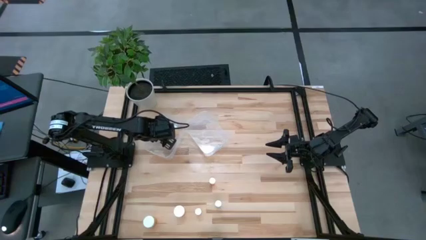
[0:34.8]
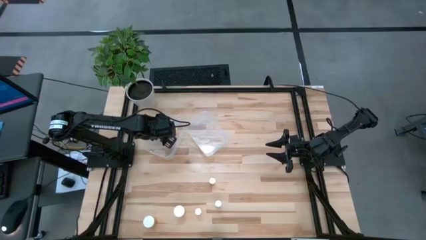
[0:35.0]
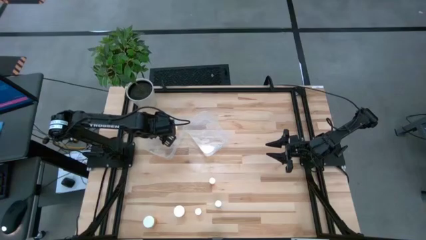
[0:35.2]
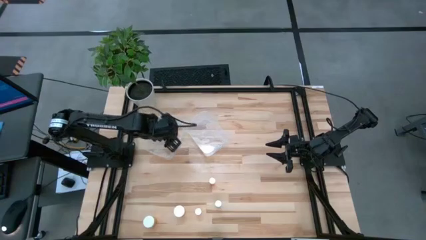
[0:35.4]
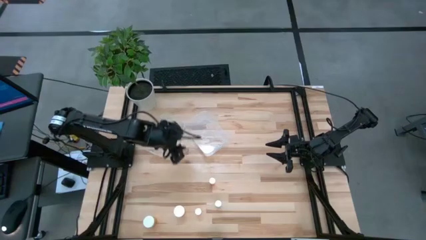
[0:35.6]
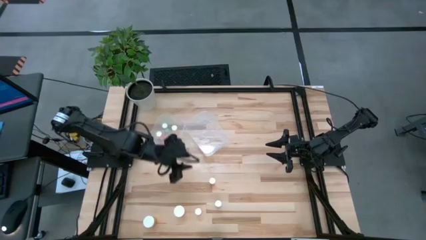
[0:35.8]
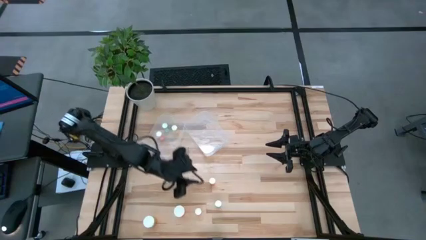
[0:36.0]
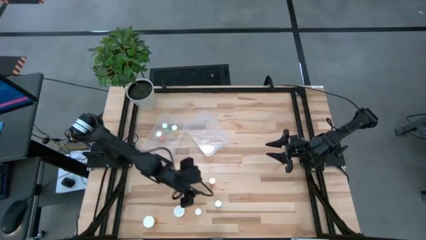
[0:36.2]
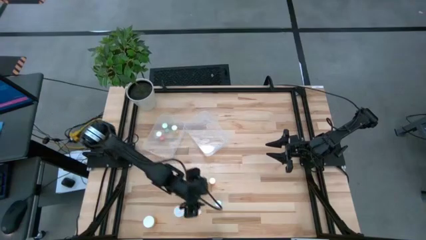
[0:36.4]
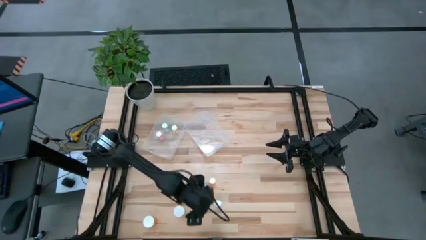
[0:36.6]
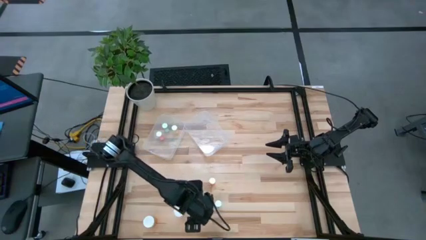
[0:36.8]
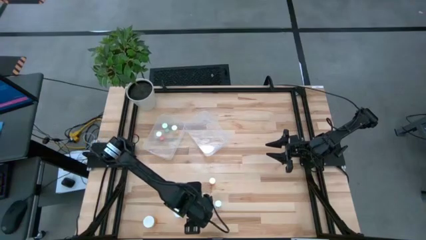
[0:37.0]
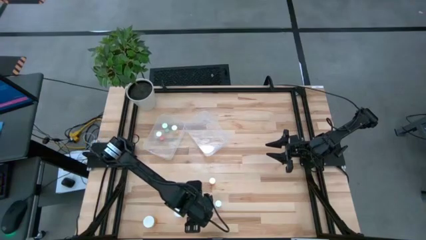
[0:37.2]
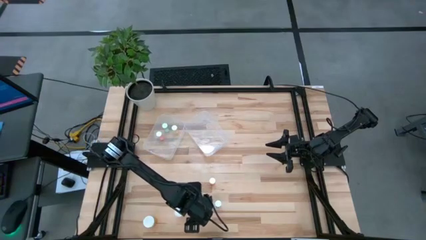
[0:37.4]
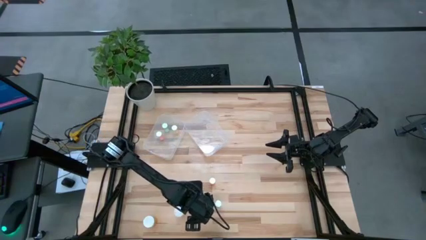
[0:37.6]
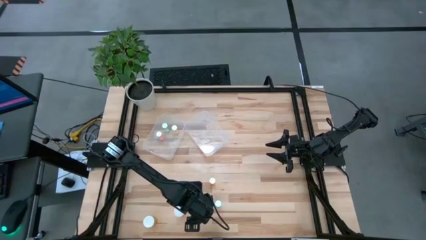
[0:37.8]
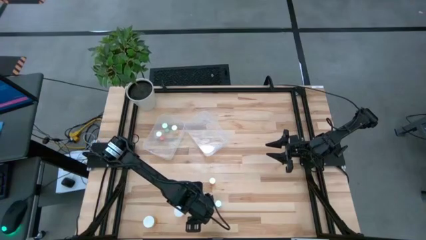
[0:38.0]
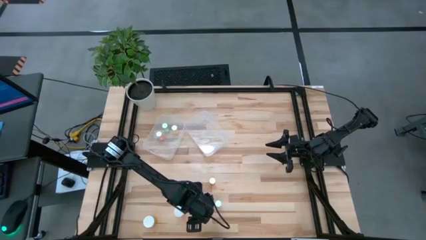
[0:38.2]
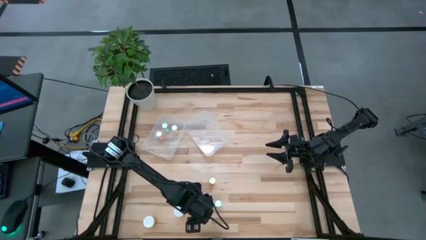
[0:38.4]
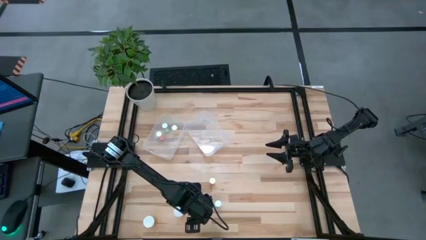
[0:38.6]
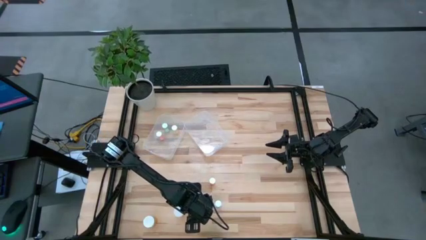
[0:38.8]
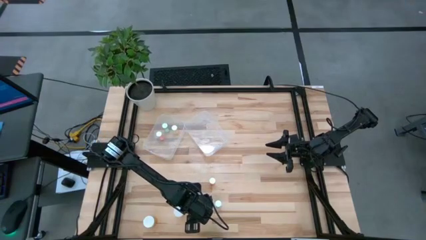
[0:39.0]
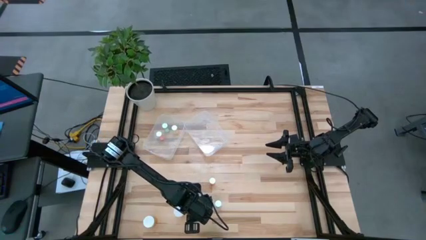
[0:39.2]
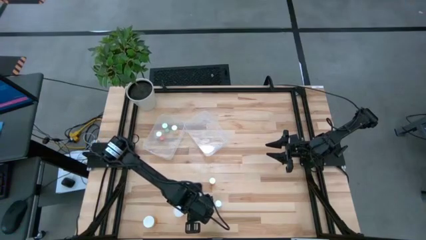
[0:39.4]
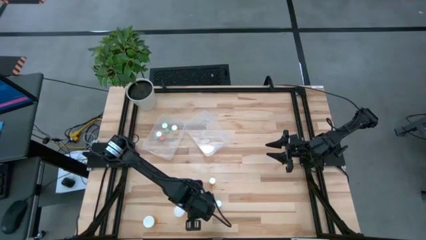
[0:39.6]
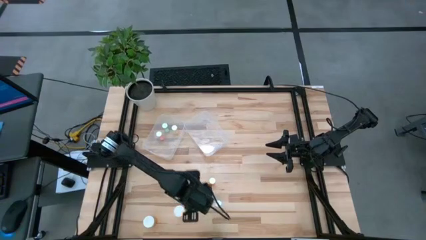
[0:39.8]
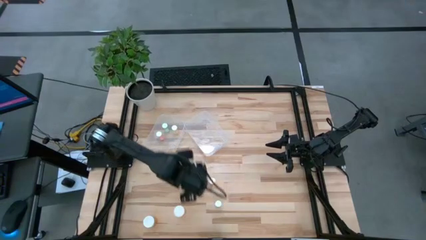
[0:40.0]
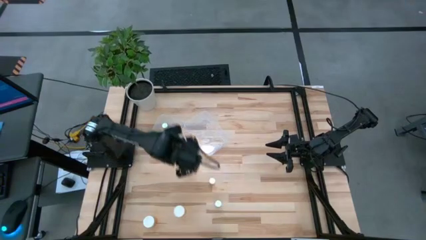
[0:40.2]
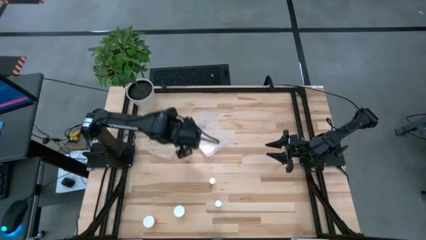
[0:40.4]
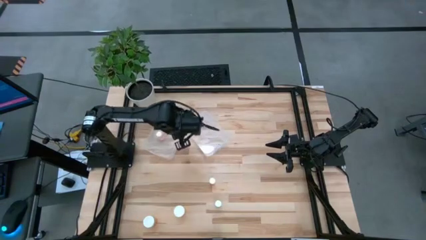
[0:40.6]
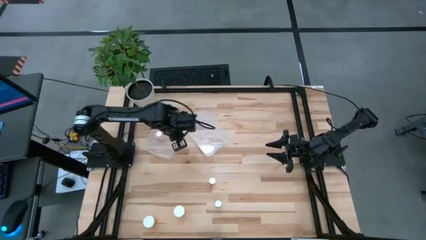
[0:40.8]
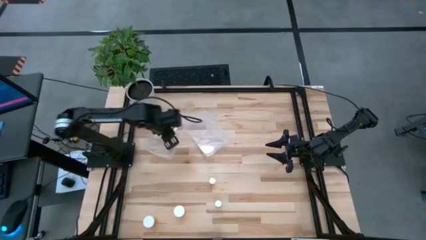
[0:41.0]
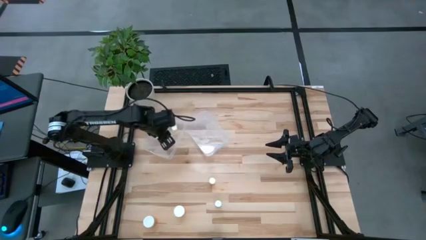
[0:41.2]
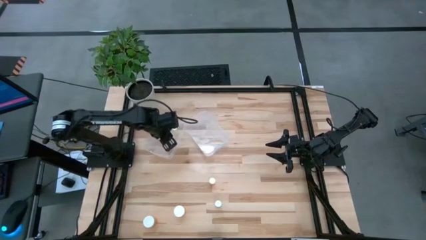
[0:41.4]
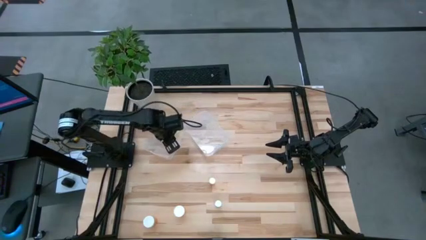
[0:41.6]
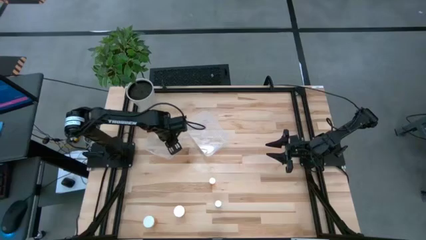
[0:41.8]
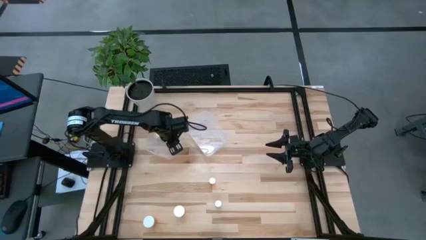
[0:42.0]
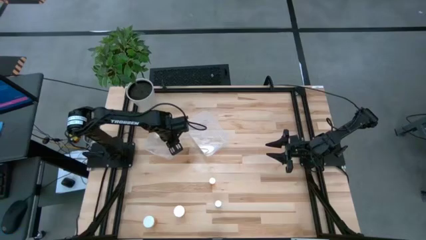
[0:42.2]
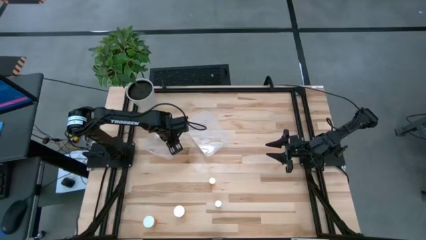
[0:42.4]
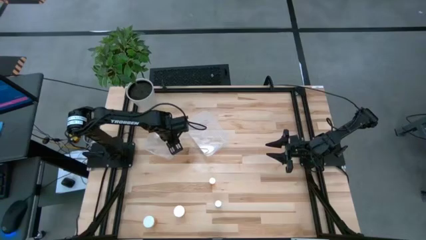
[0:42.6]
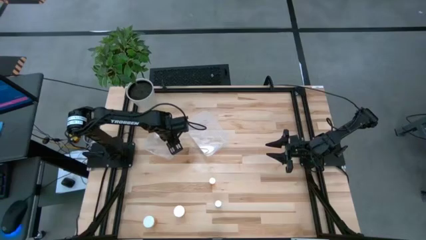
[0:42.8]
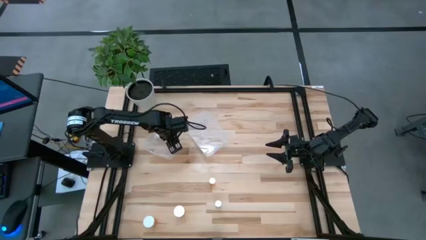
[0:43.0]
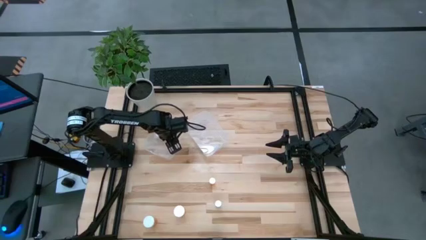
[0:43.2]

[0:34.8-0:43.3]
Task: Pick and place medicine bottles into bin by pill shape (circle, oval)
Put the orange tablet bottle into the left transparent bin

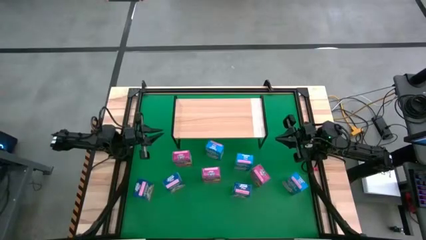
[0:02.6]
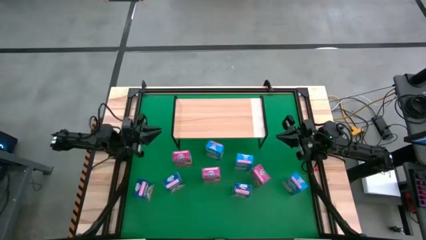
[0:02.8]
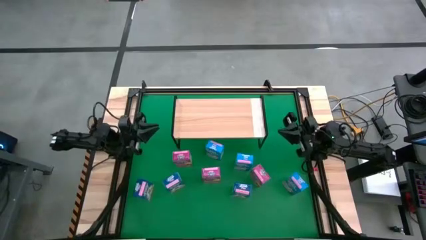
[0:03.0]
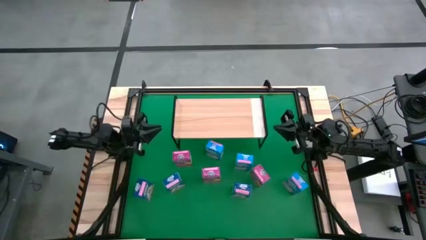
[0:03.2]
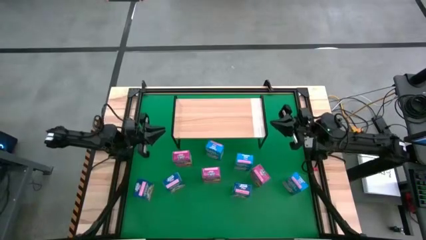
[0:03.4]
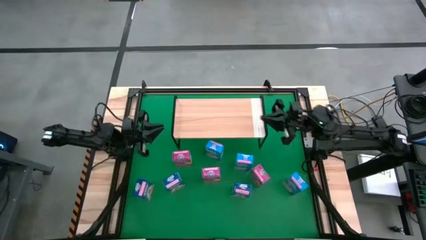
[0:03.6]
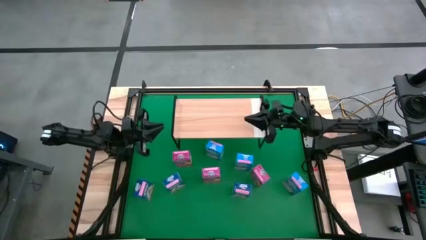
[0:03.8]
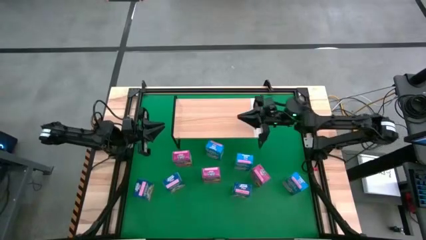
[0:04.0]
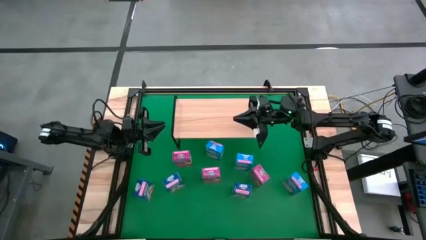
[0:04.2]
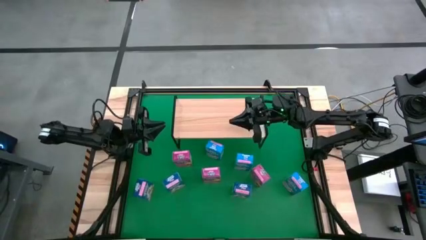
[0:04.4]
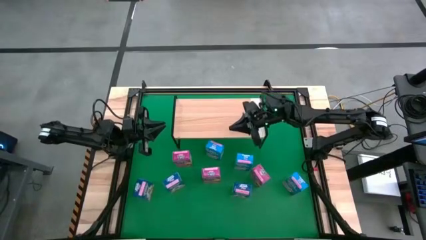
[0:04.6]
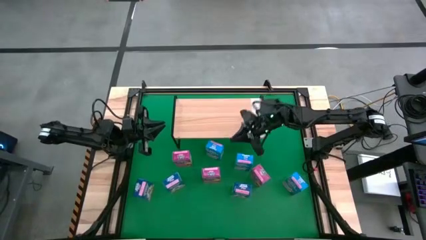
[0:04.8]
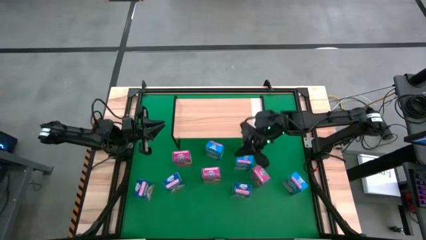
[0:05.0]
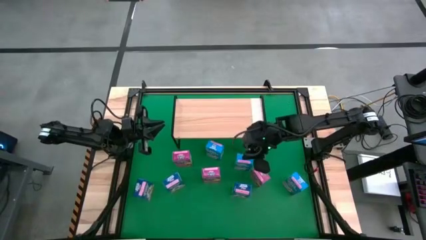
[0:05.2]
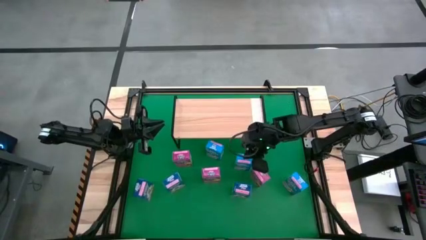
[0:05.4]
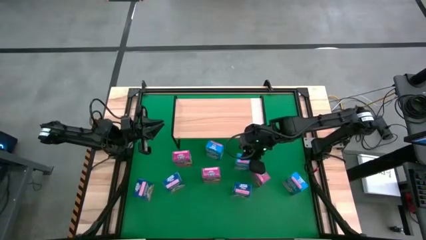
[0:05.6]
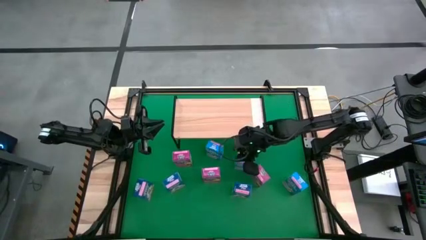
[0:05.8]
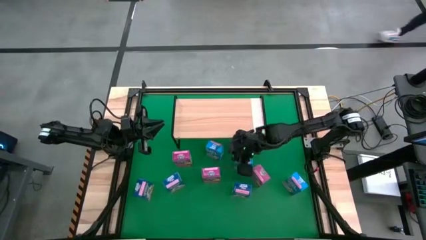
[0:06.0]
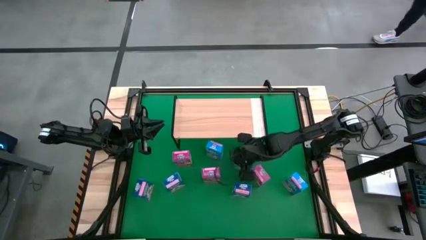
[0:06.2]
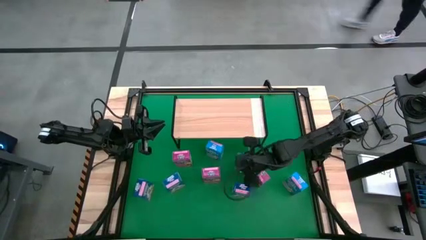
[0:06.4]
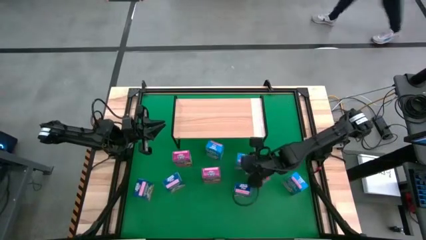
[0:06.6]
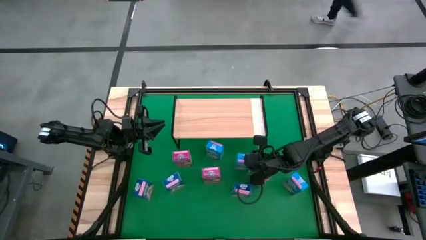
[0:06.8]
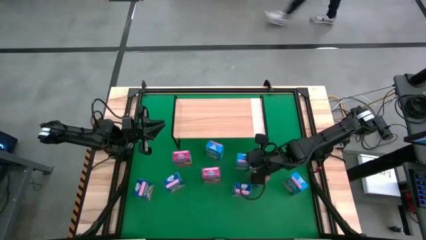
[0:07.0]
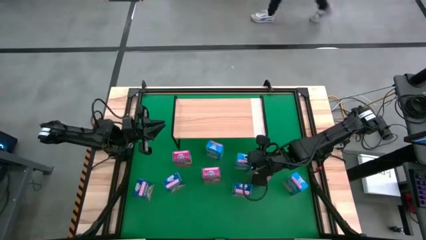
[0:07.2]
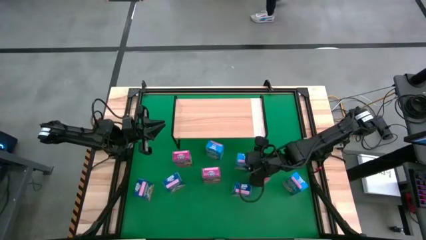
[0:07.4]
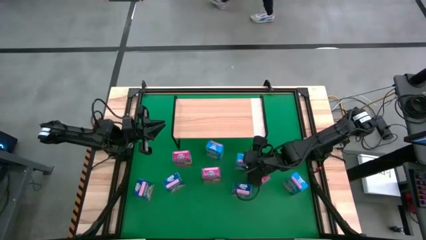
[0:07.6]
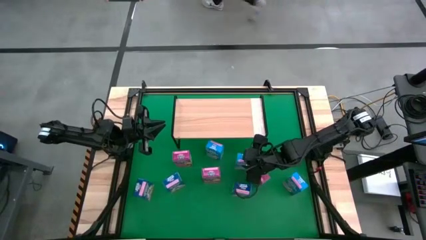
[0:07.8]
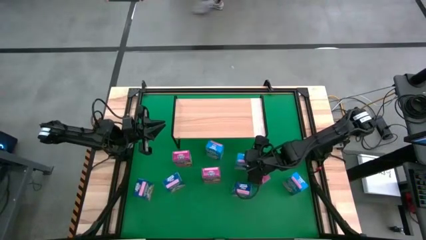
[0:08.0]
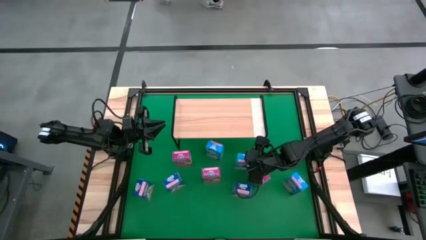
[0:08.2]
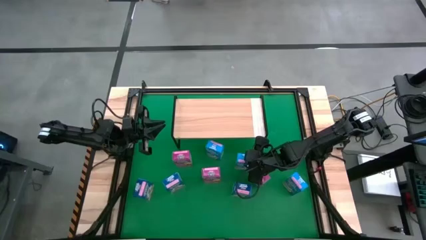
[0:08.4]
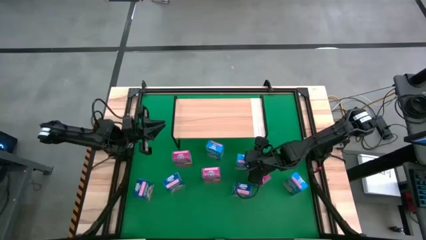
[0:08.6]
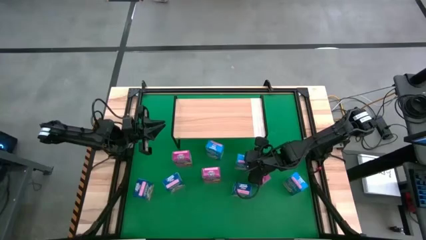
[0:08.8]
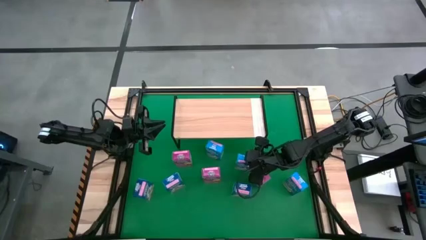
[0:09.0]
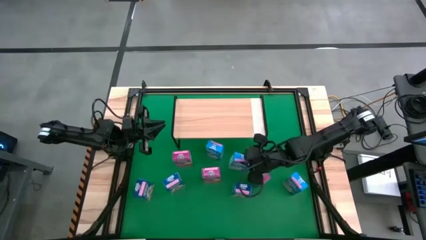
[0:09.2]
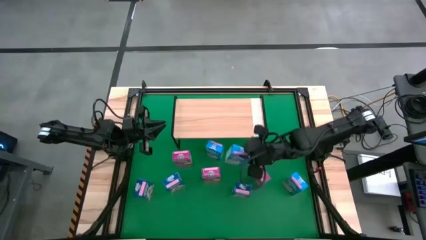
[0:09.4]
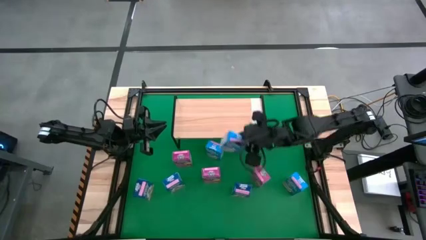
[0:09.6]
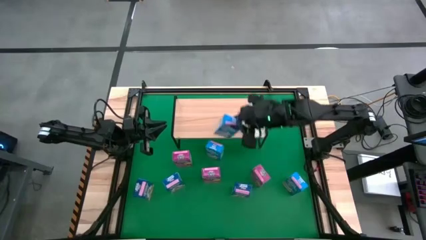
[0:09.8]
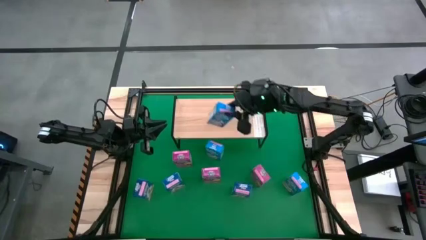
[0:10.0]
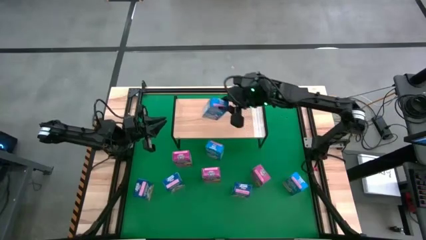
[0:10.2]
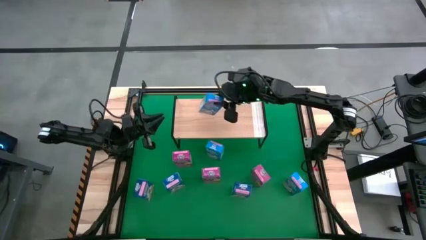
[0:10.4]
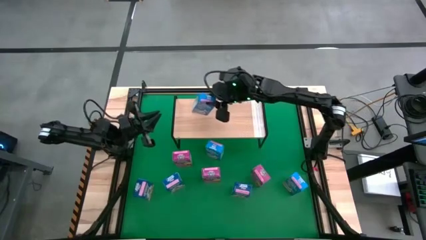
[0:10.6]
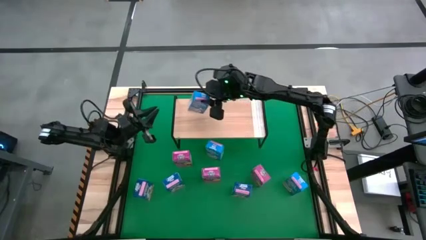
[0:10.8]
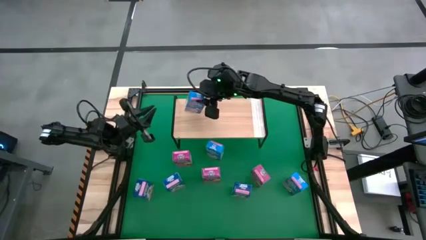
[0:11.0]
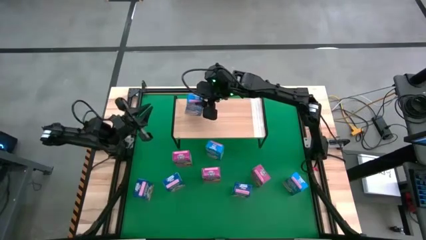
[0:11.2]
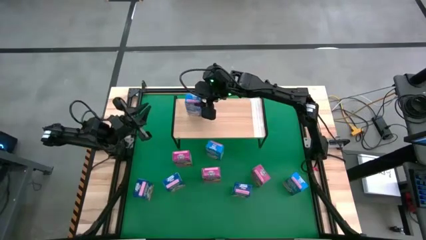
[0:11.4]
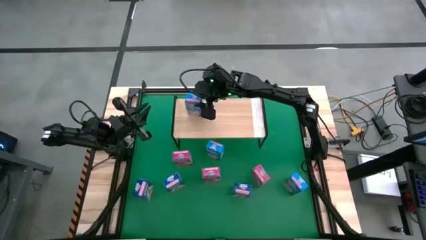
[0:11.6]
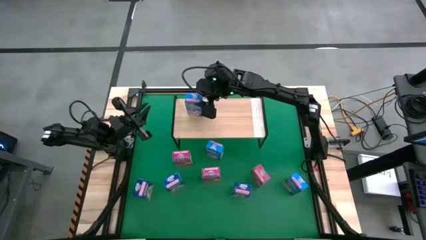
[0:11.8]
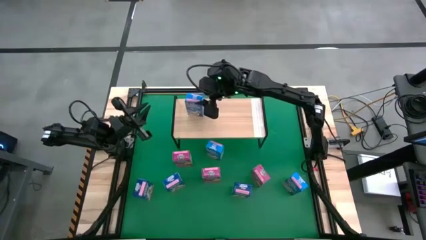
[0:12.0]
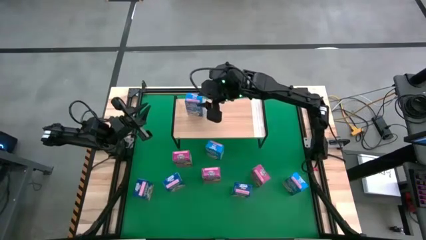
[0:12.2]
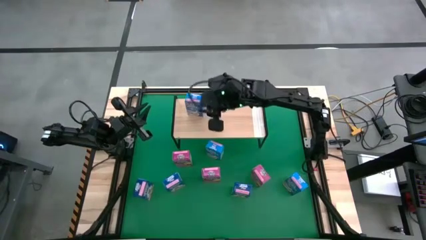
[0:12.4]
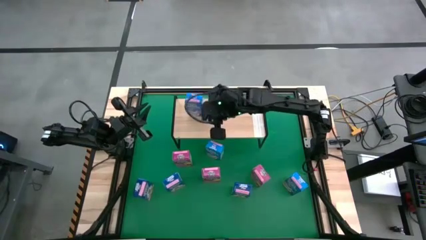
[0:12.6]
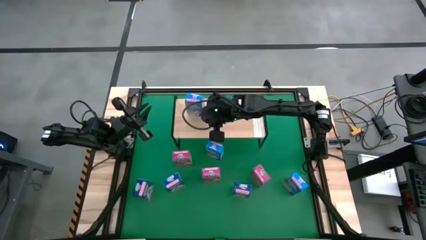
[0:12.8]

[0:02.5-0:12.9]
Task: Stack cereal on shelf
Put the center light blue cereal box on the shelf
